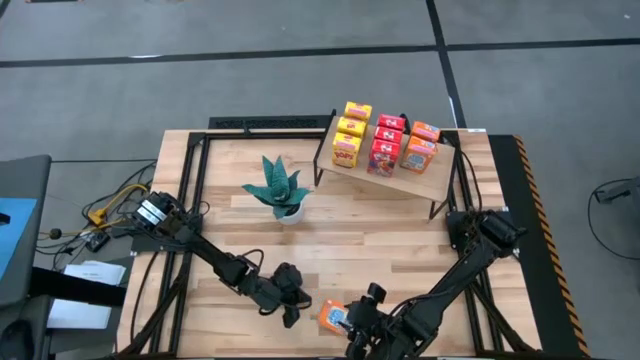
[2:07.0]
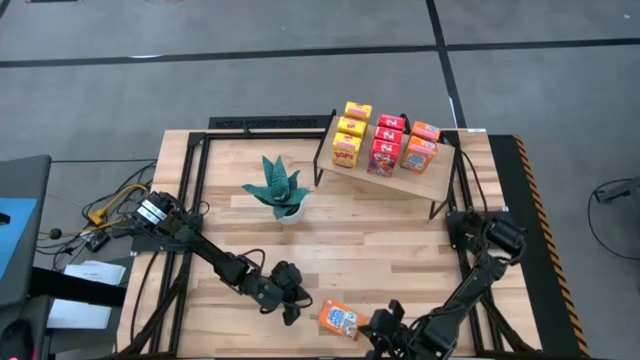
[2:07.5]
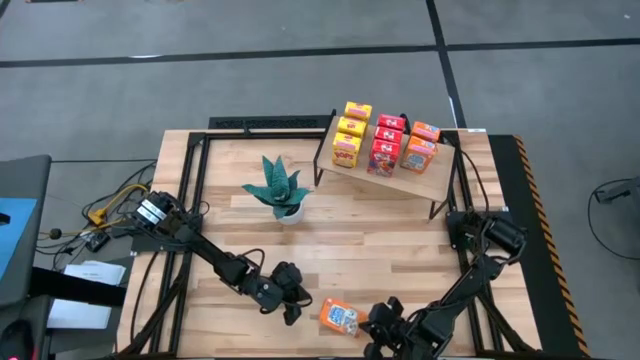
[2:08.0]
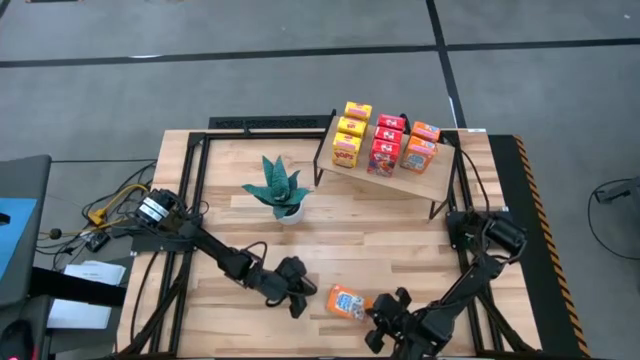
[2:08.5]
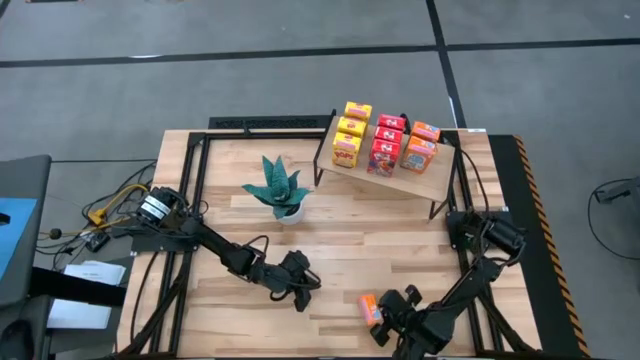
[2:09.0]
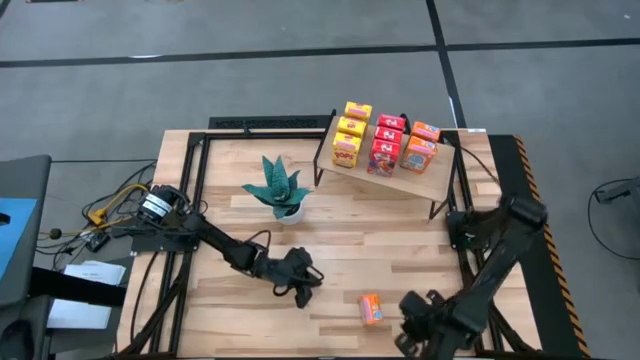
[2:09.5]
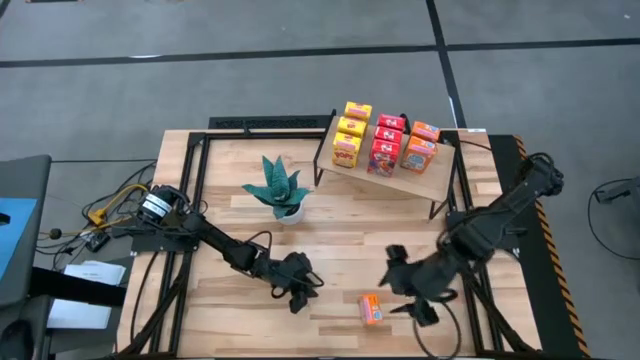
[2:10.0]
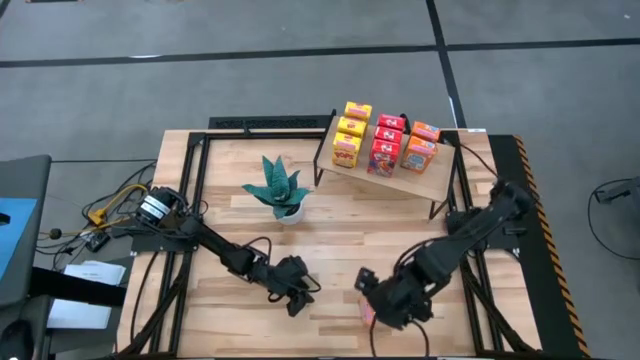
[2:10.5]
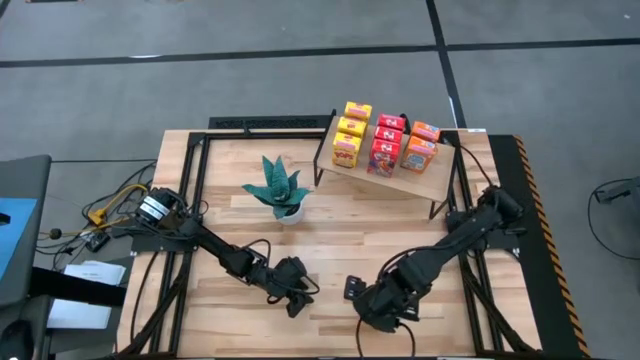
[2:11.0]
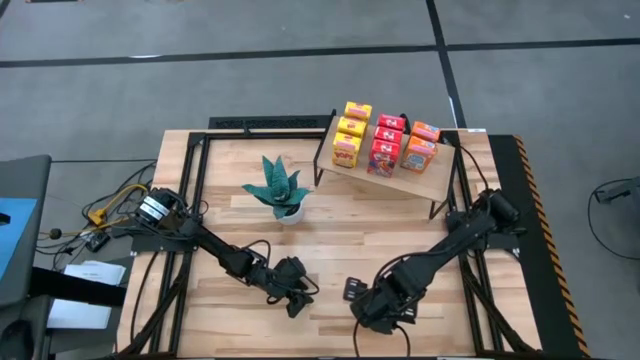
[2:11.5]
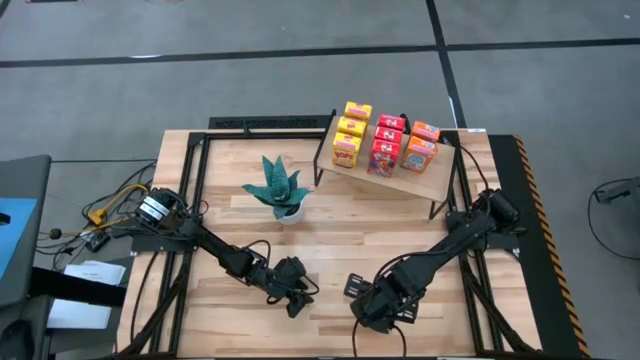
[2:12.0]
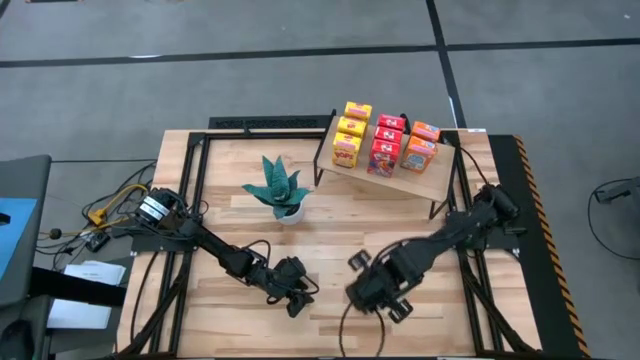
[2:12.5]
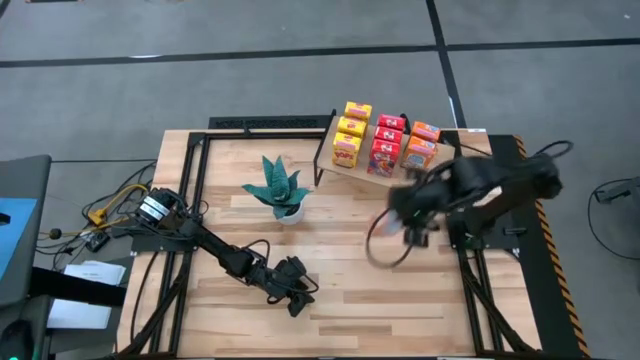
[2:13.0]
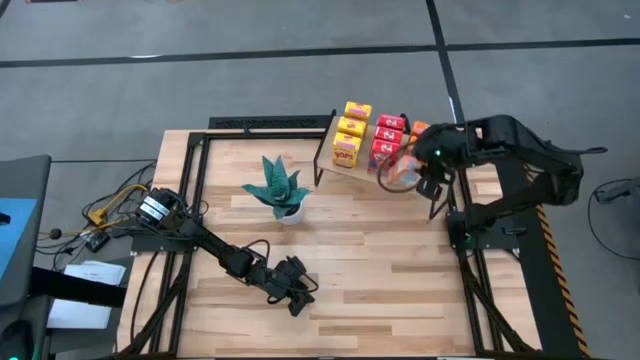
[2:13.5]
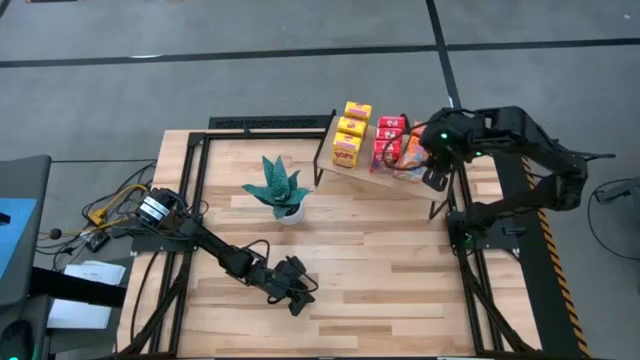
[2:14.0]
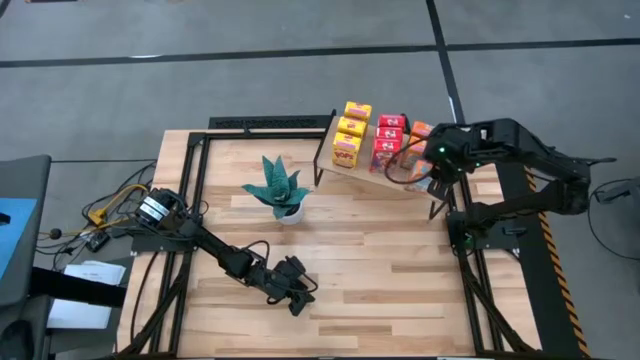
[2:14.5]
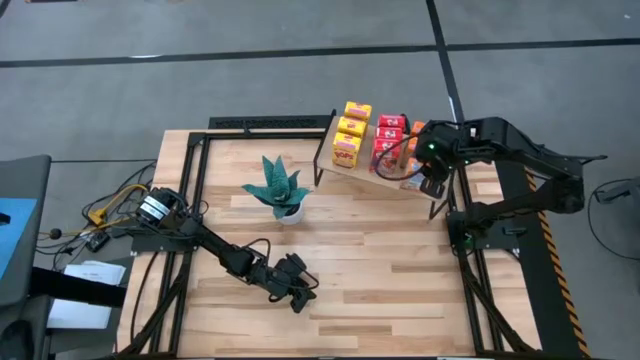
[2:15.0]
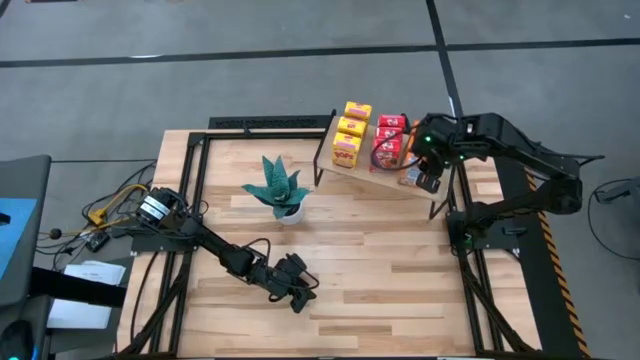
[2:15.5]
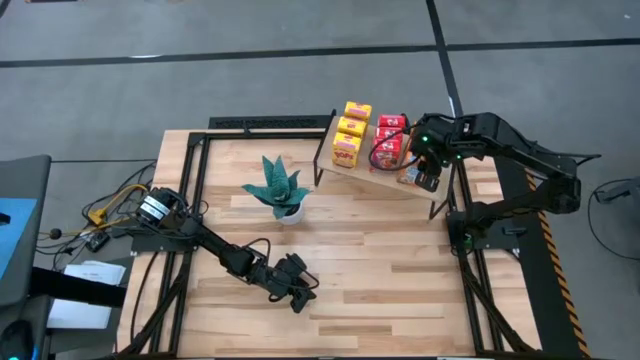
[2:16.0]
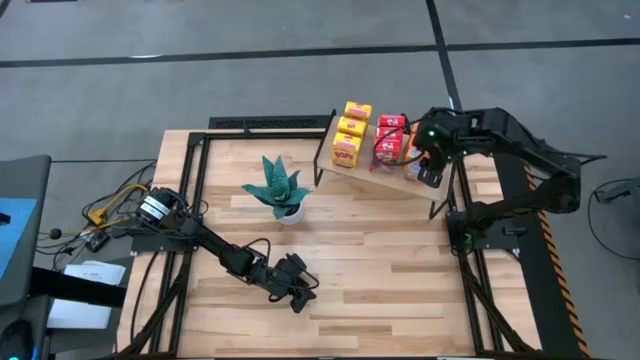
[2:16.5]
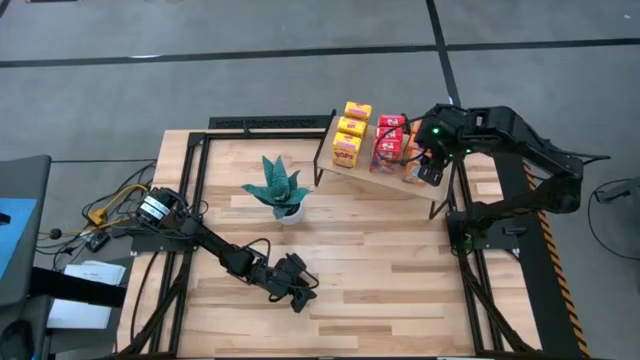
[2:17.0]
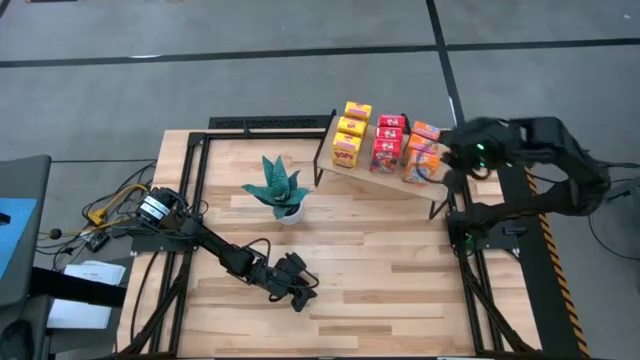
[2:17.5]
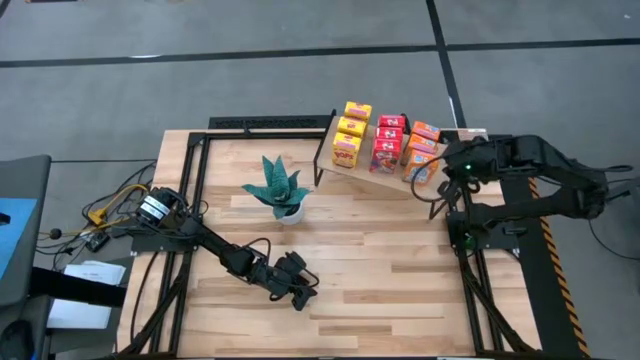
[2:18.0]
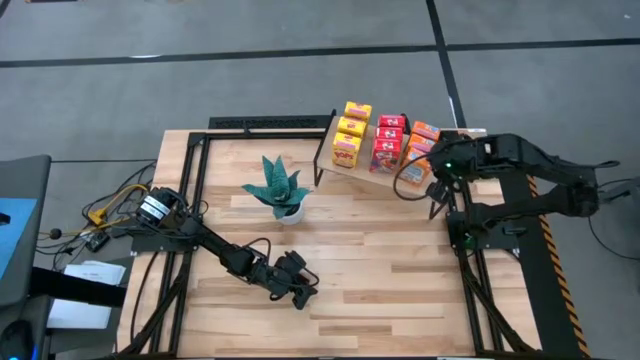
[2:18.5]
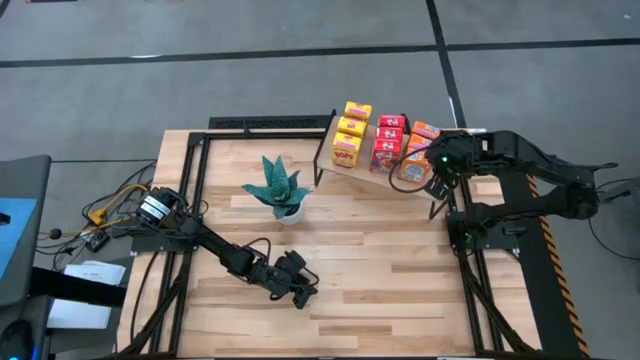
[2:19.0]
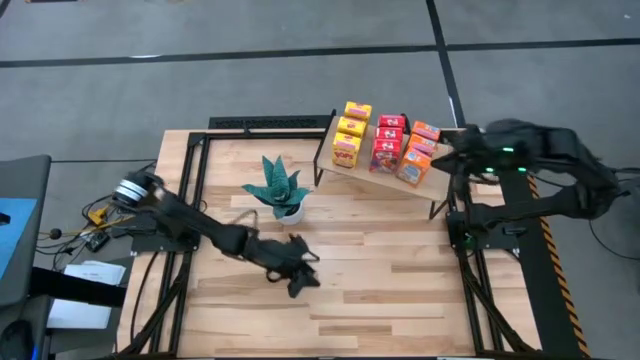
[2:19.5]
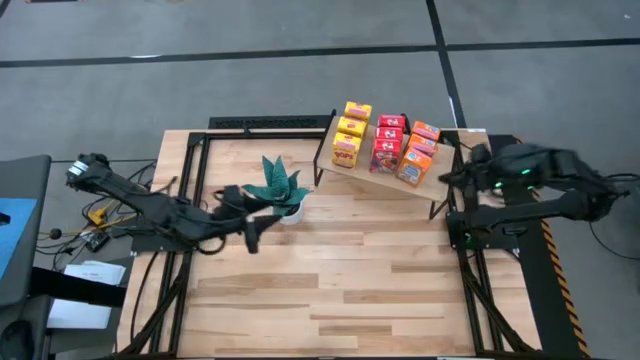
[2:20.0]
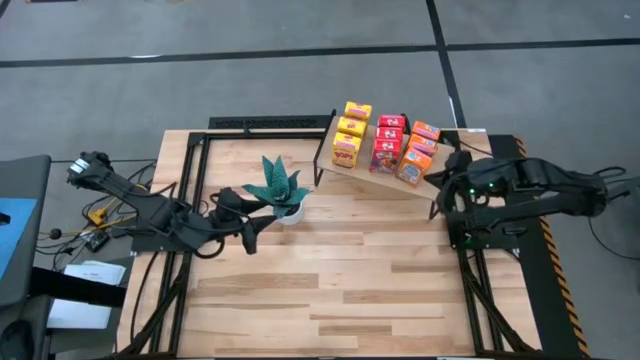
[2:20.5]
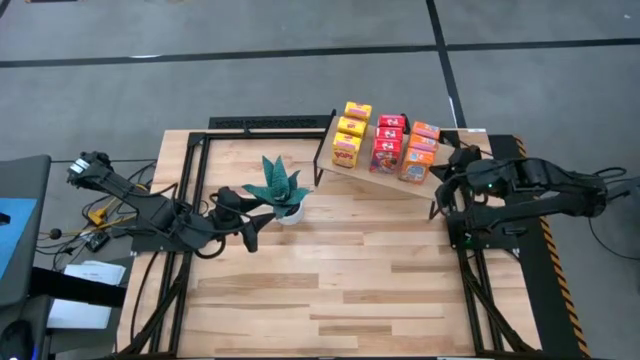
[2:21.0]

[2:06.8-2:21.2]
Task: Stack cereal on shelf
Put the orange cereal box on the shelf aligned with the other orange cereal boxes

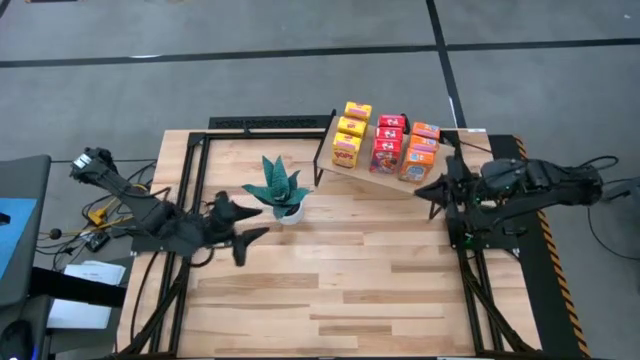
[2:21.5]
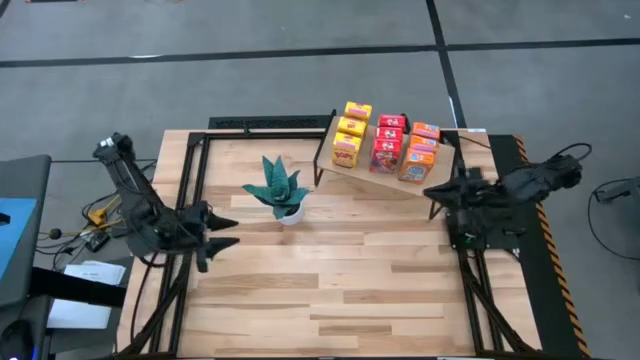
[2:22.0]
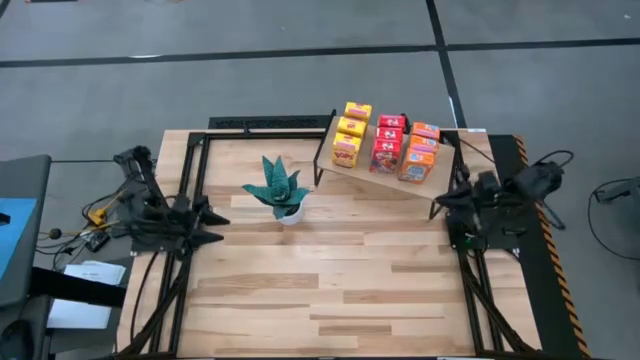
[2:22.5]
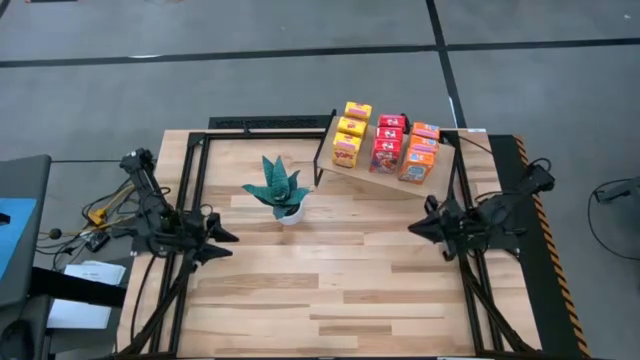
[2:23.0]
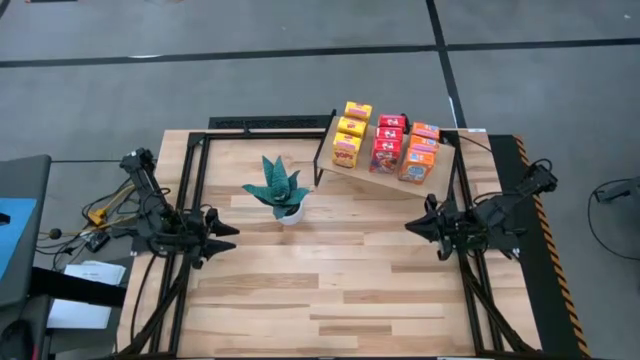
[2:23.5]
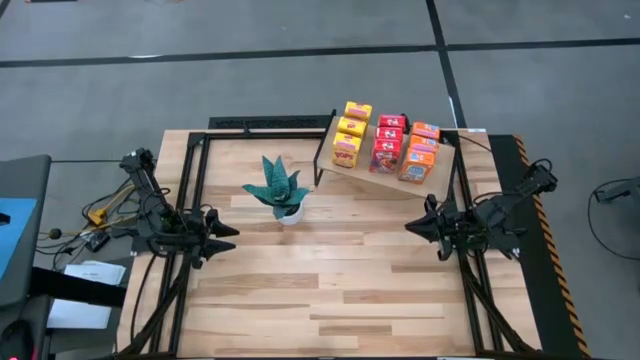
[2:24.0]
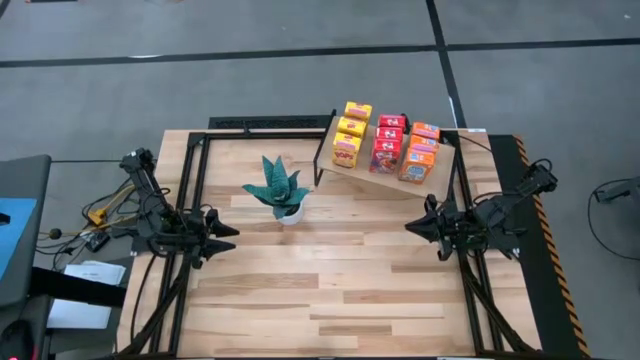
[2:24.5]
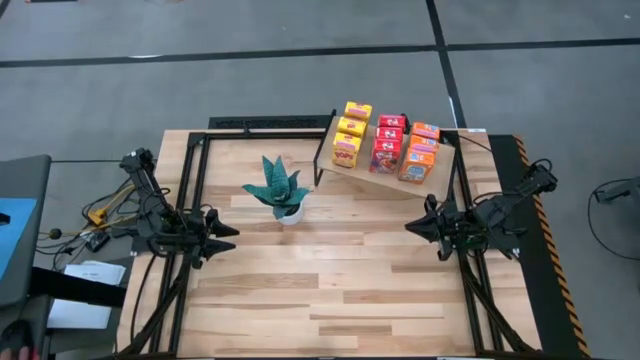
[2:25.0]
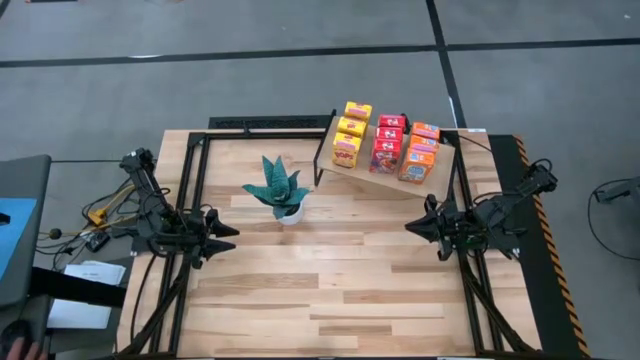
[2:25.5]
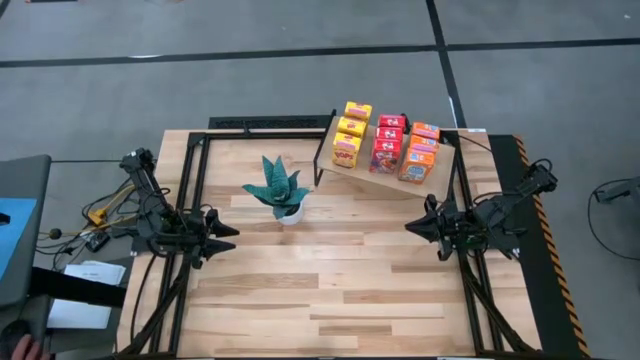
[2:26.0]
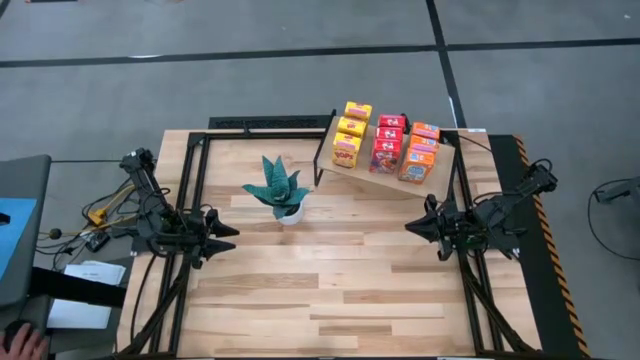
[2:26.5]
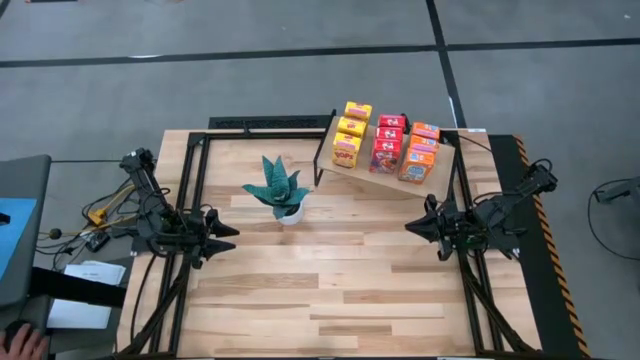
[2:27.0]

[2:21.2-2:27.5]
Return to Home Position
